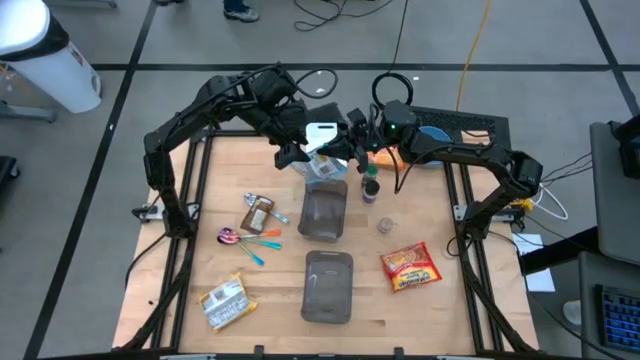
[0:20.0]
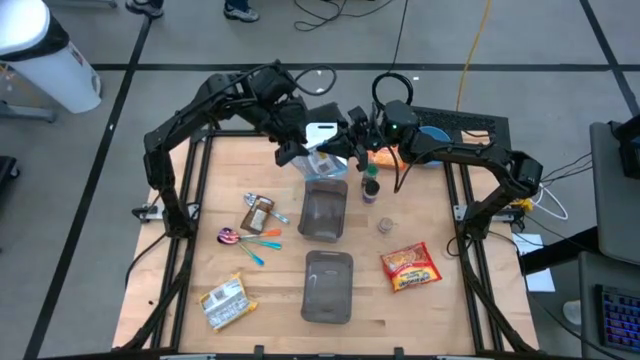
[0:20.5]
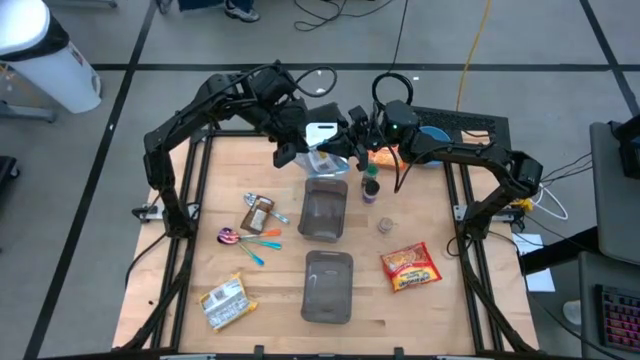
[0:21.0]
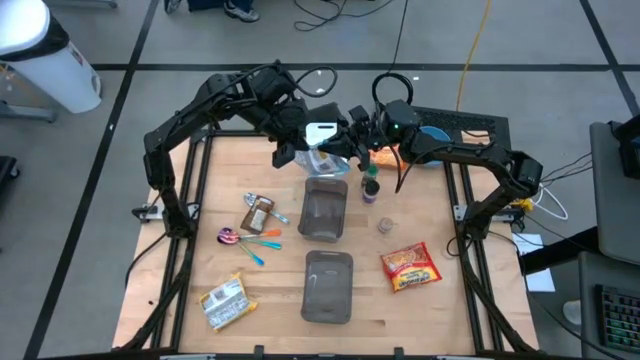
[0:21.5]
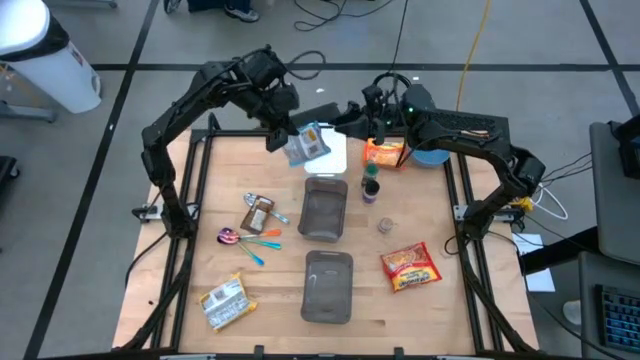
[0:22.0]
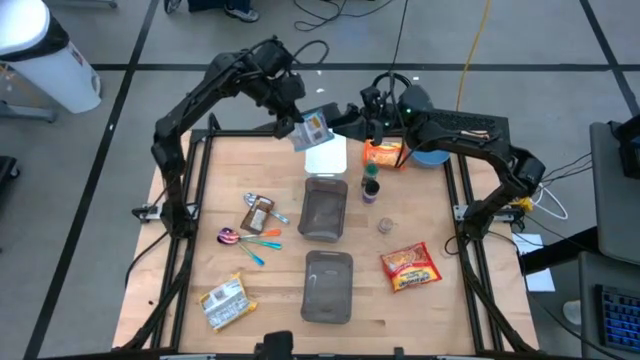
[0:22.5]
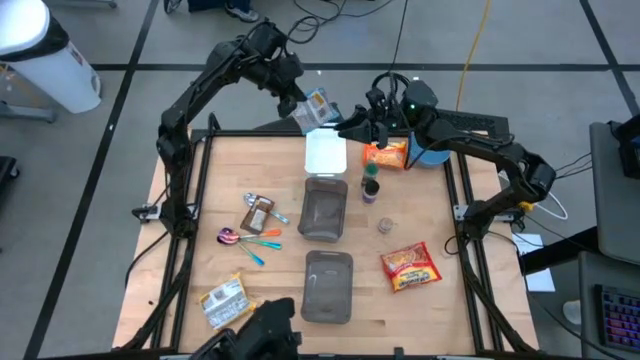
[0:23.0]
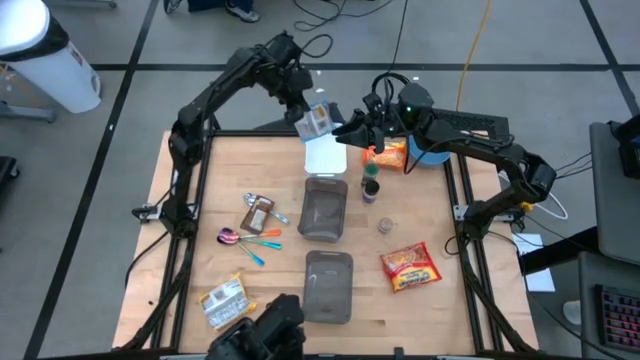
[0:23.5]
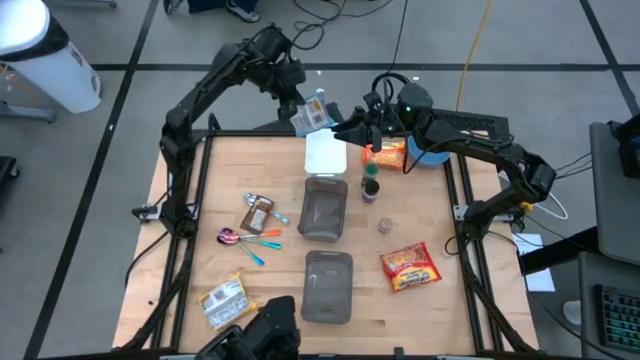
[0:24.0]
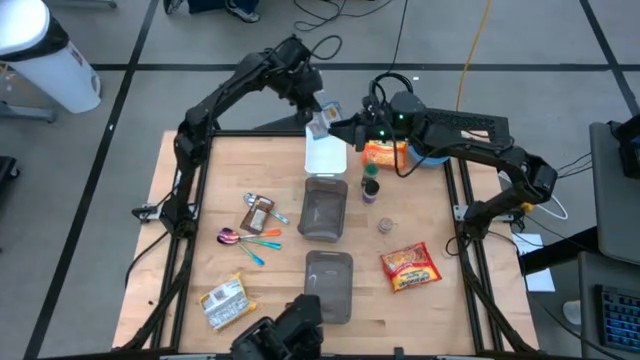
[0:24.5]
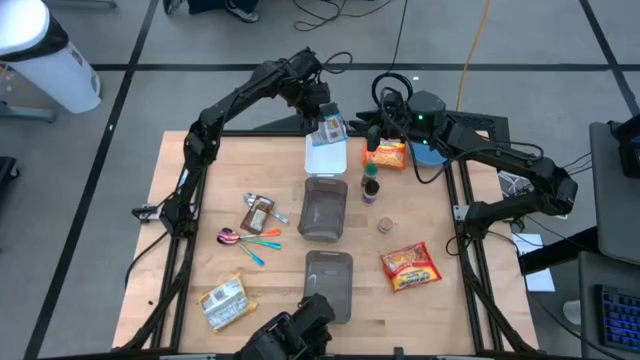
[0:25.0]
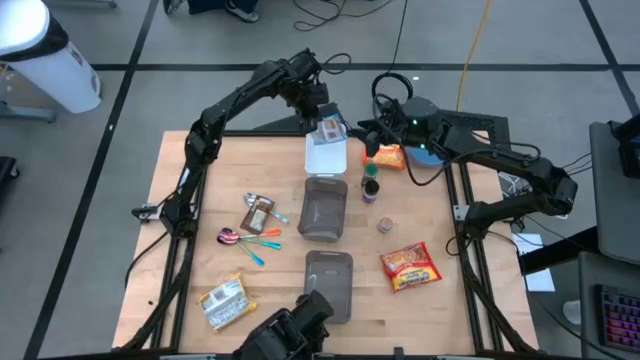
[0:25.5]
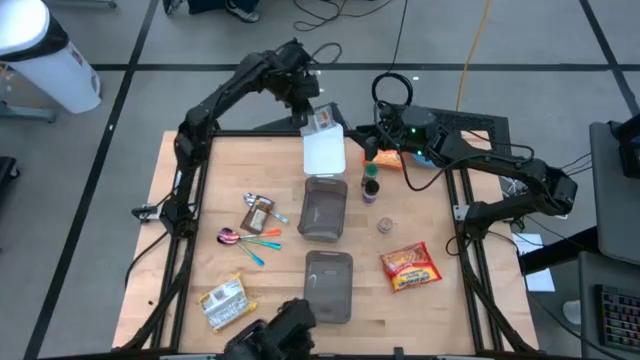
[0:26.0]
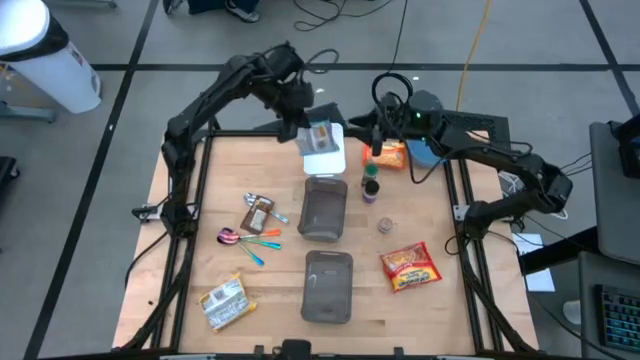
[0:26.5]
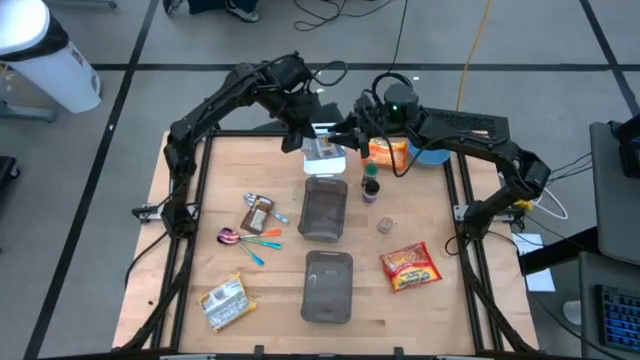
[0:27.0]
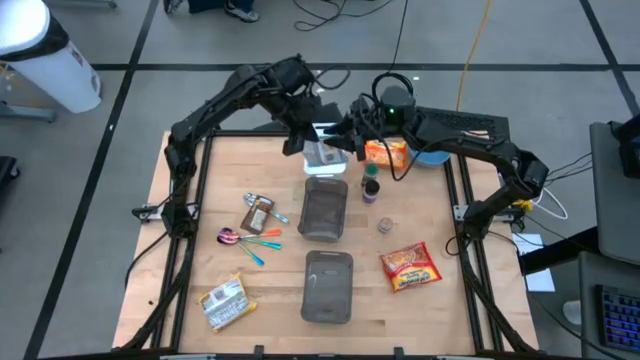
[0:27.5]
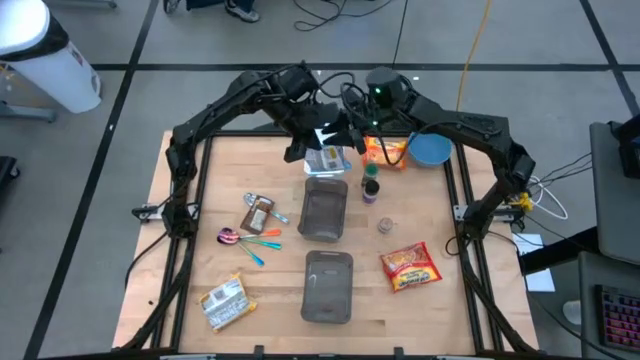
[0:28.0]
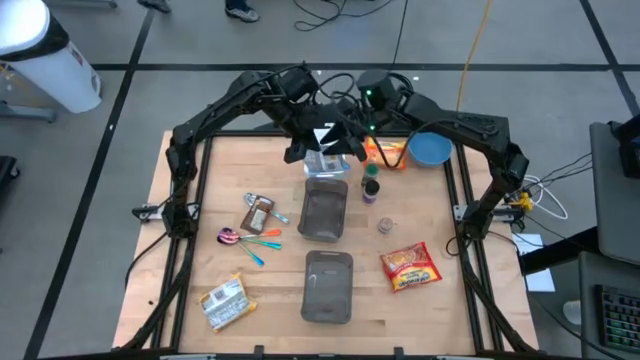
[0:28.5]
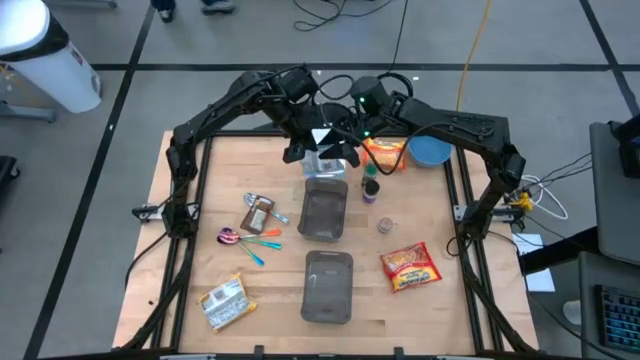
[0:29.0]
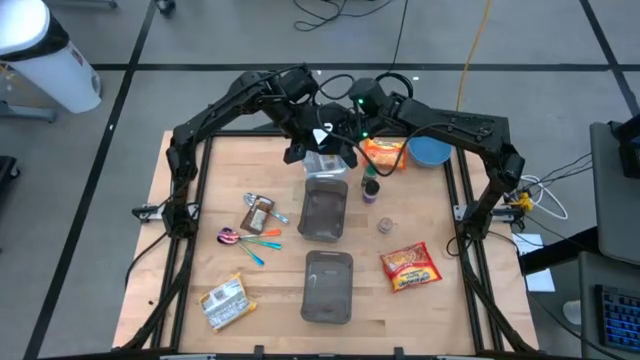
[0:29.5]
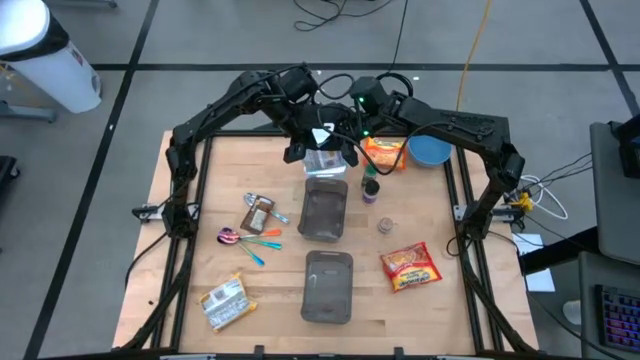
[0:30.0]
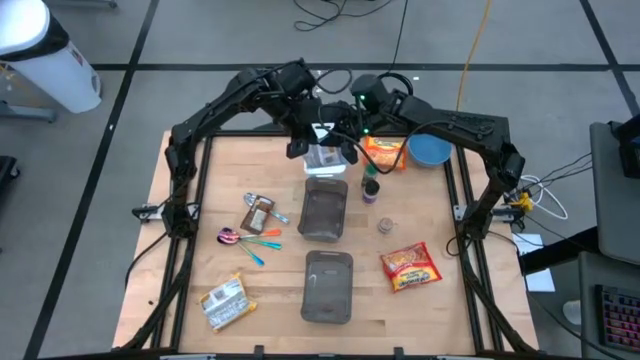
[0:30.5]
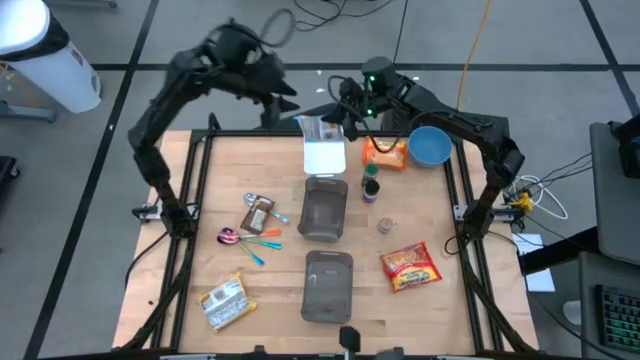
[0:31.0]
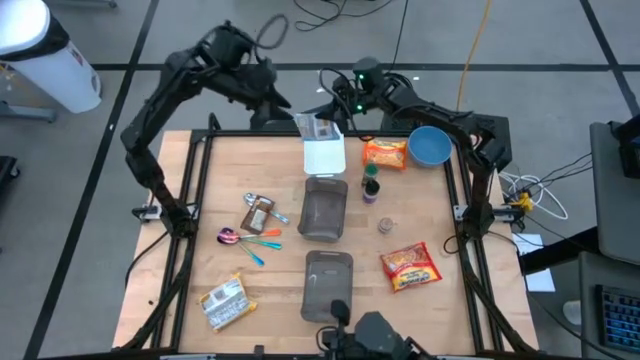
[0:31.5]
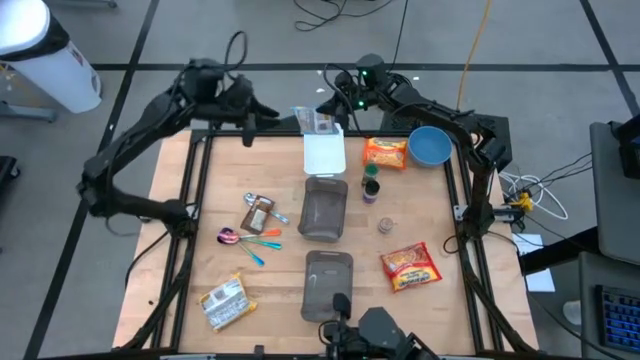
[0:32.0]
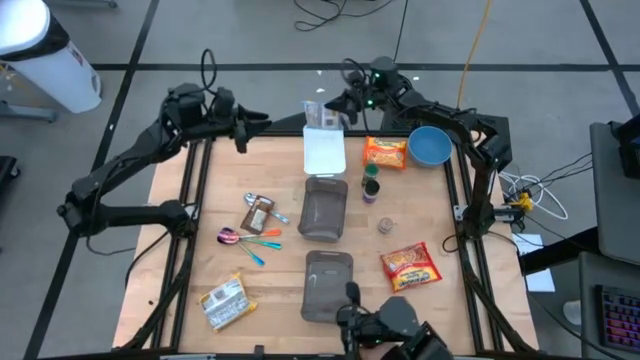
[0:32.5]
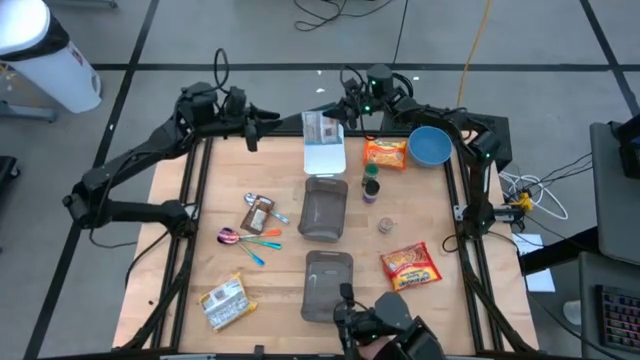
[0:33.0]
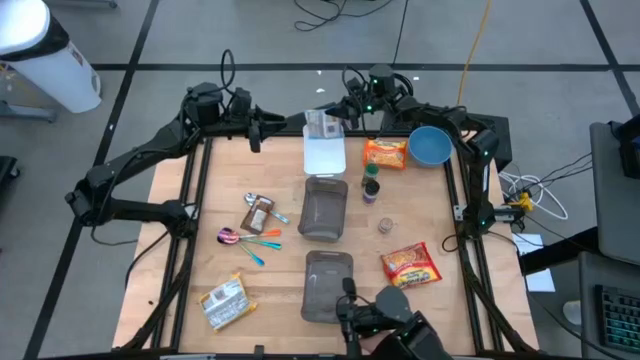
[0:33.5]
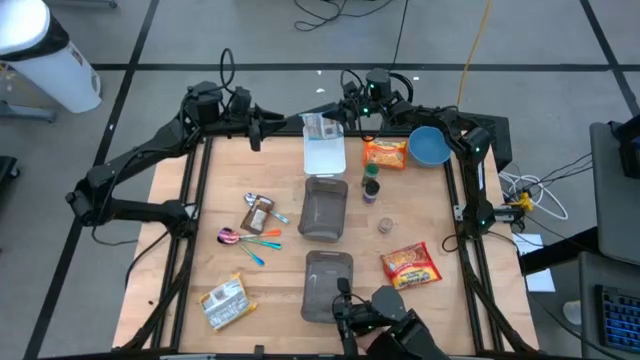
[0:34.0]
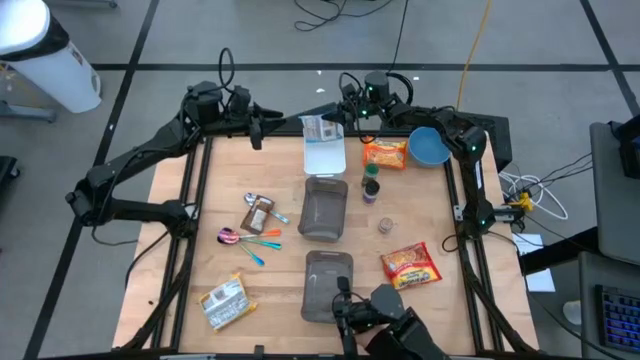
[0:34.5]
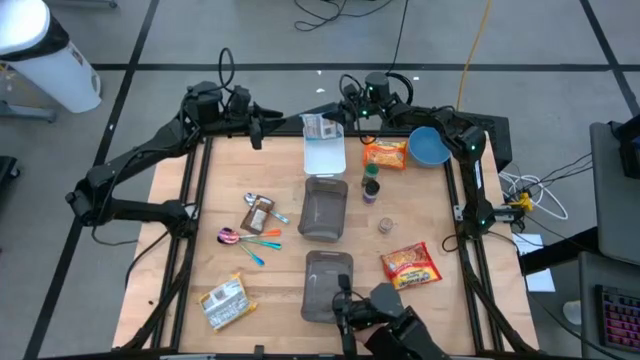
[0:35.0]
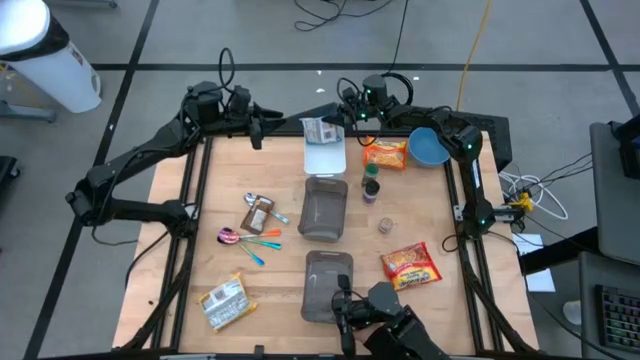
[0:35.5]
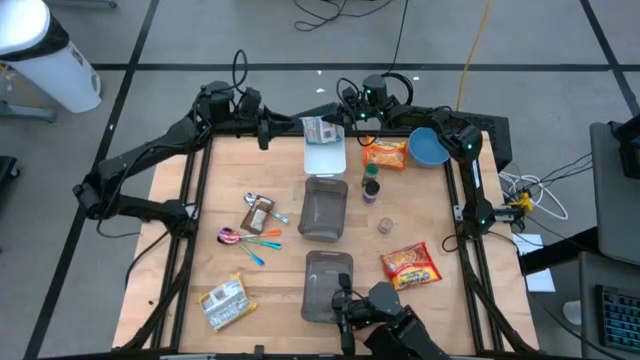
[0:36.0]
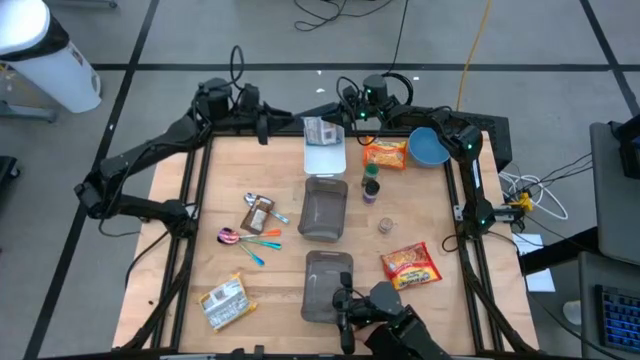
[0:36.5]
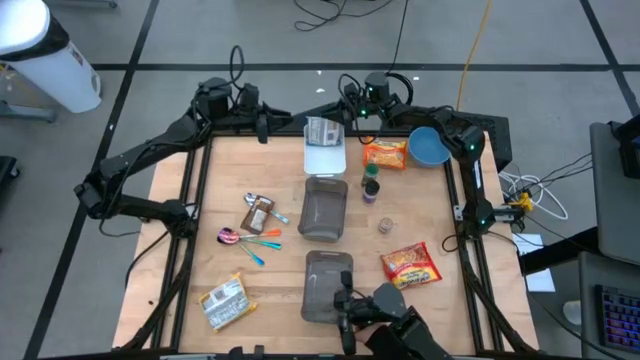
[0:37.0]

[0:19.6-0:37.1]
Task: Pick & Place Food Item
Put the blue noodle pack into the white bin

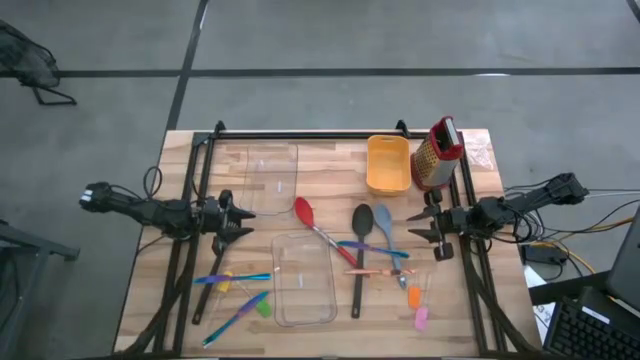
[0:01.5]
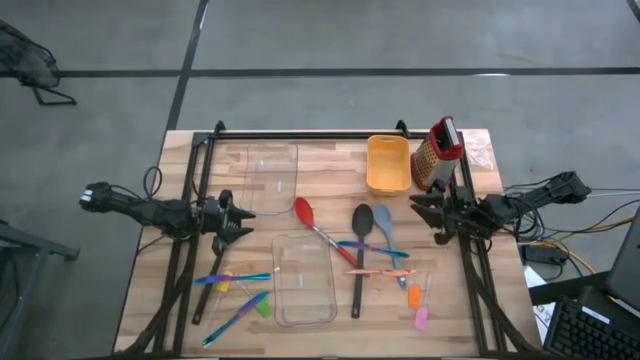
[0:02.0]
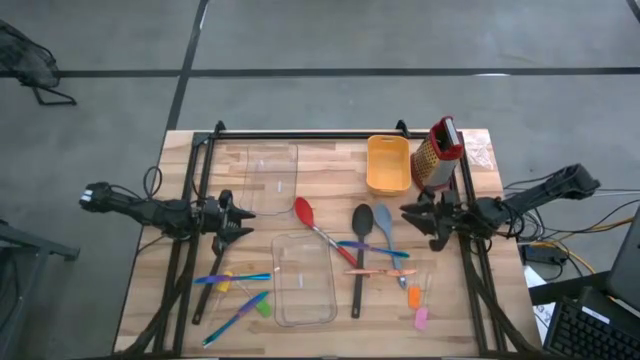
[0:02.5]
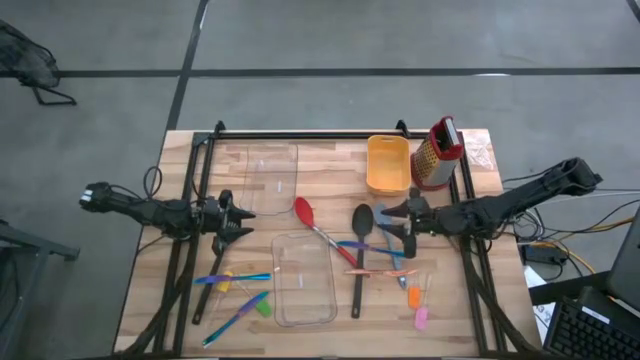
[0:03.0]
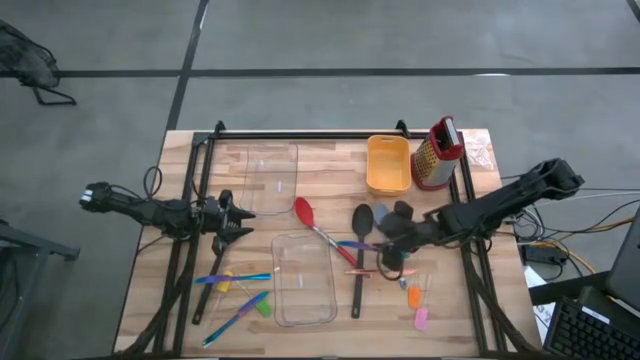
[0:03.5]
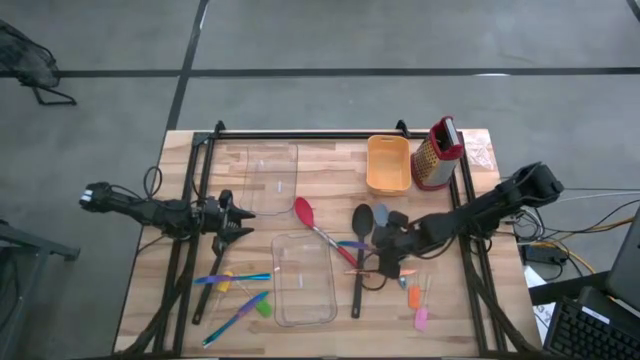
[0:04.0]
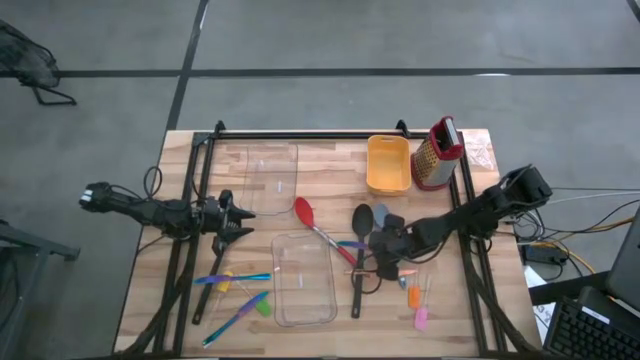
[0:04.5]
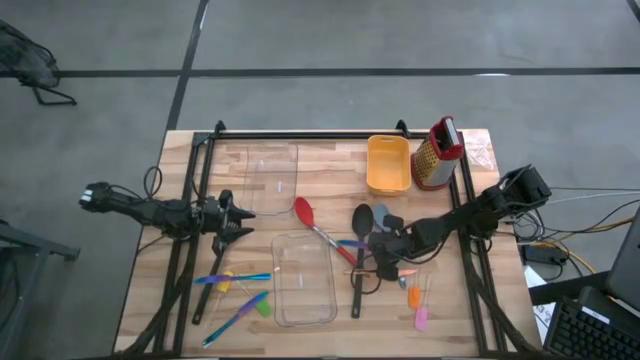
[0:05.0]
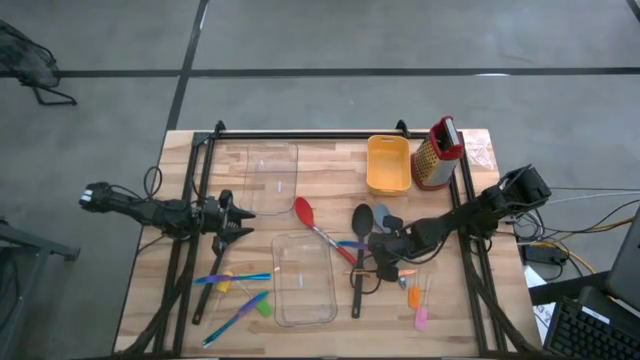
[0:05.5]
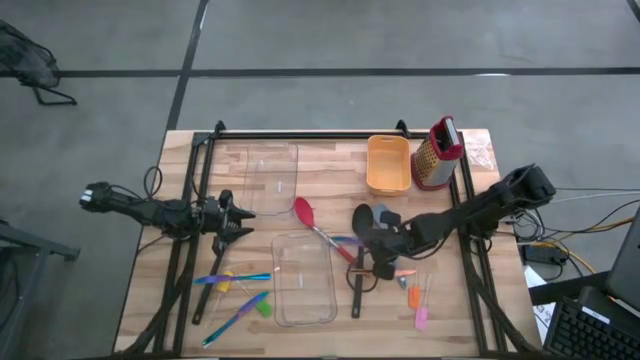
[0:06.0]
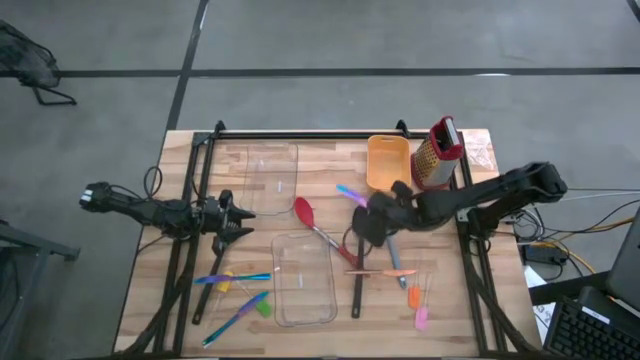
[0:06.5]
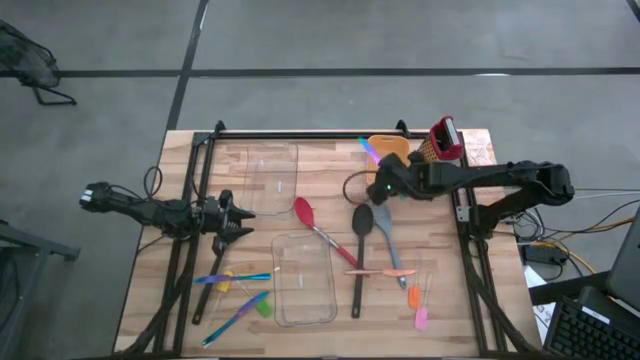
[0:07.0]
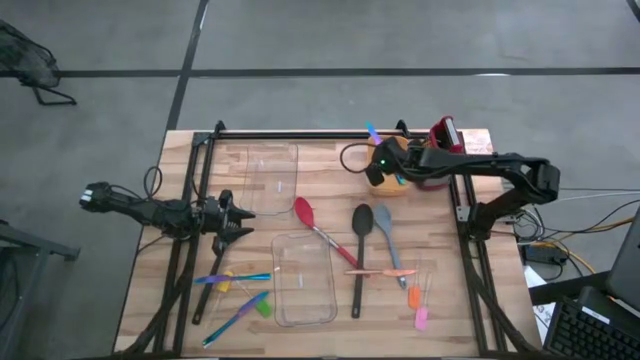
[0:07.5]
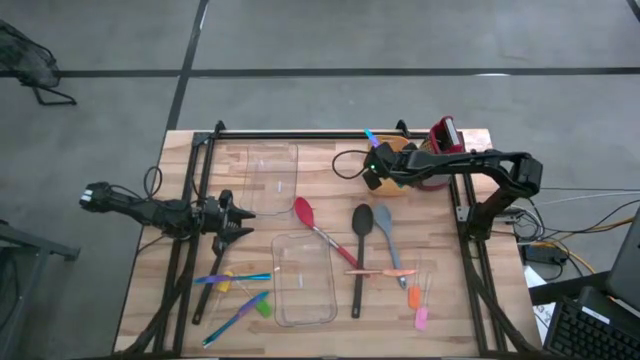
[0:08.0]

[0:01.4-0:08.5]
Task: Pick & Place Kitchen Items
Put the top right blue knife into the yellow bin
